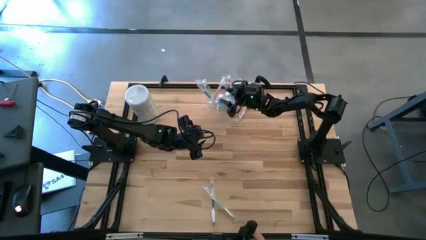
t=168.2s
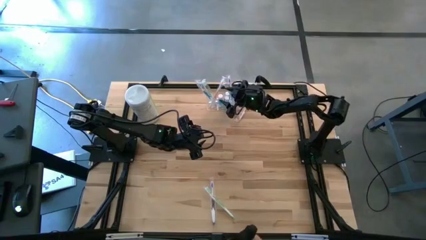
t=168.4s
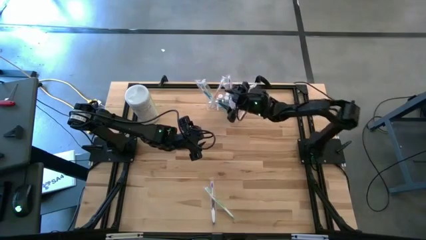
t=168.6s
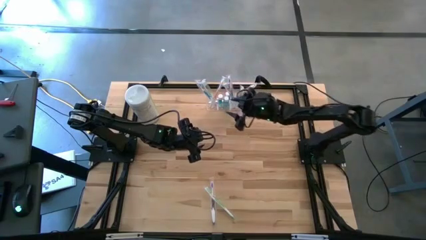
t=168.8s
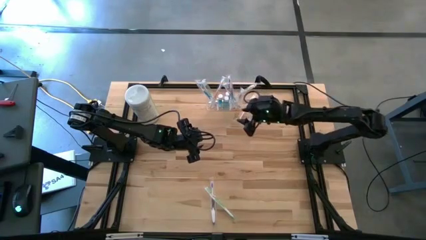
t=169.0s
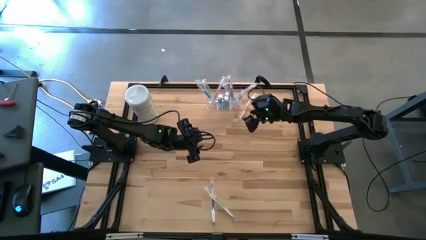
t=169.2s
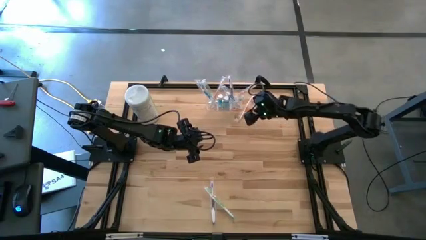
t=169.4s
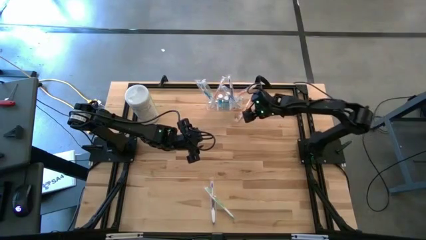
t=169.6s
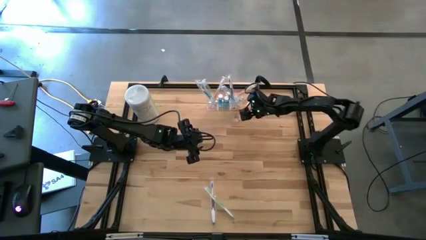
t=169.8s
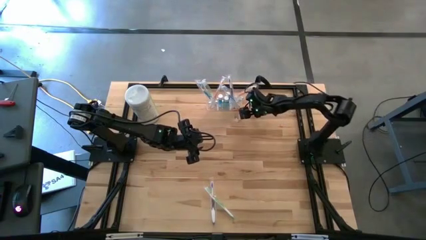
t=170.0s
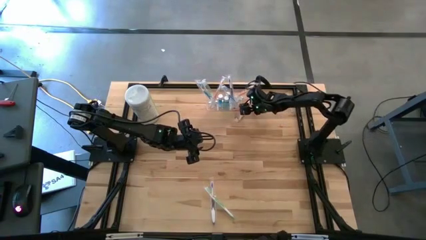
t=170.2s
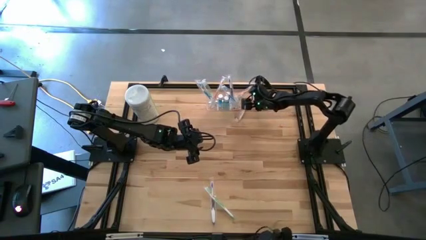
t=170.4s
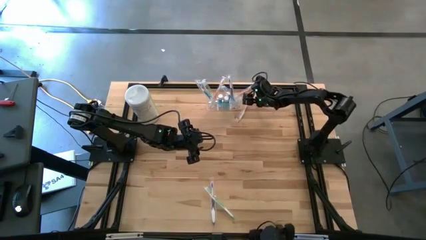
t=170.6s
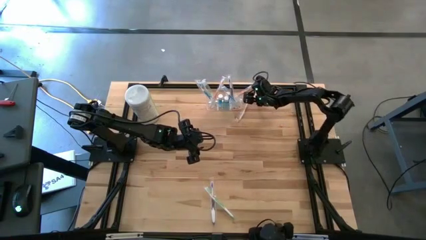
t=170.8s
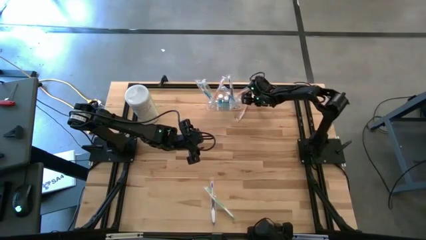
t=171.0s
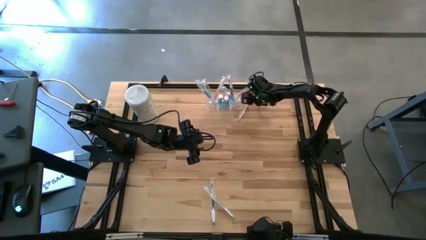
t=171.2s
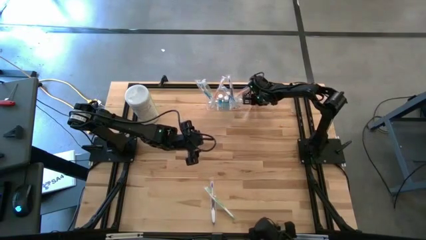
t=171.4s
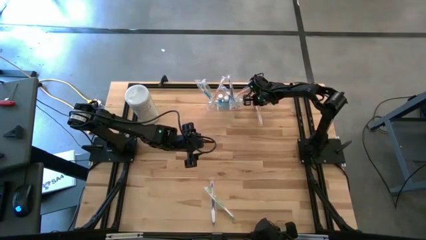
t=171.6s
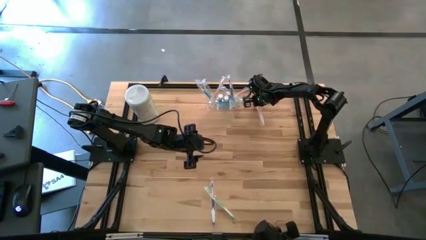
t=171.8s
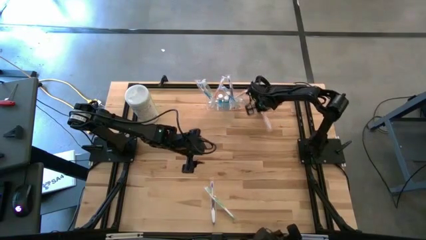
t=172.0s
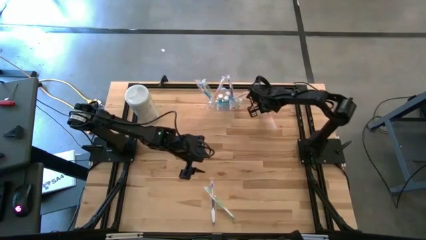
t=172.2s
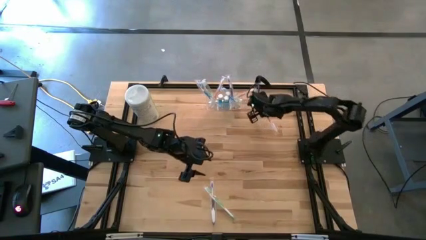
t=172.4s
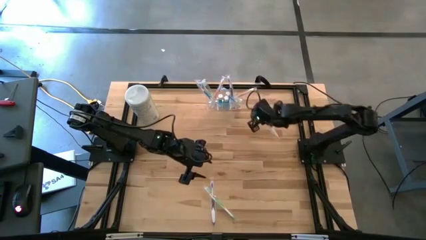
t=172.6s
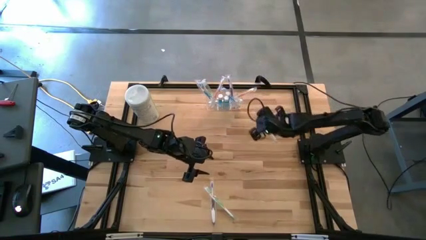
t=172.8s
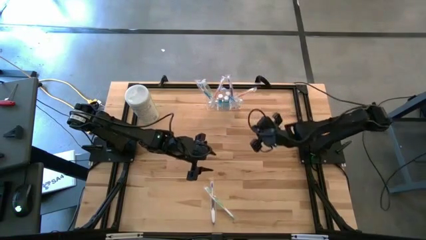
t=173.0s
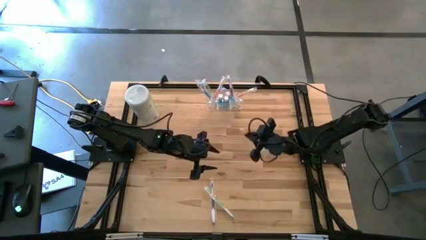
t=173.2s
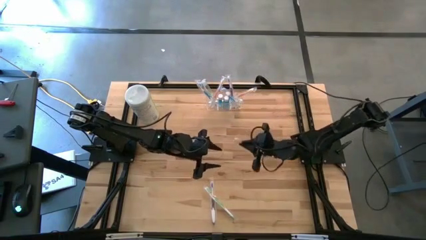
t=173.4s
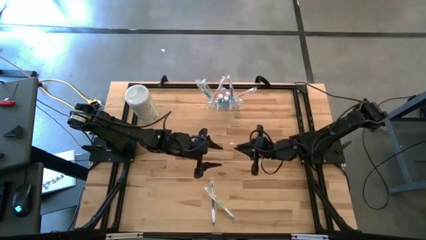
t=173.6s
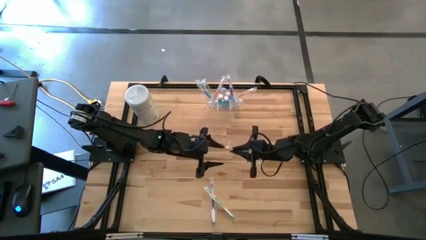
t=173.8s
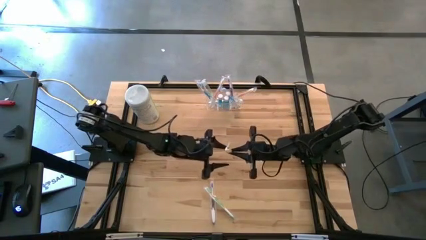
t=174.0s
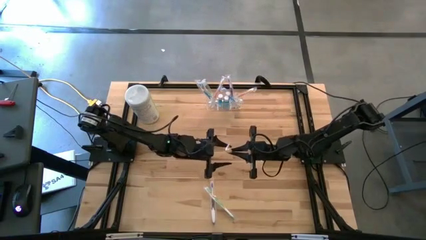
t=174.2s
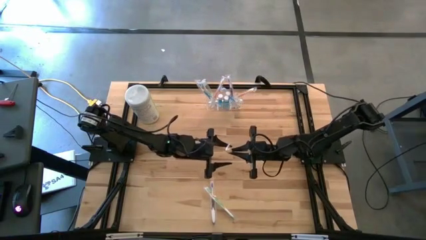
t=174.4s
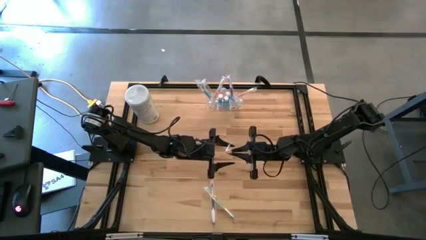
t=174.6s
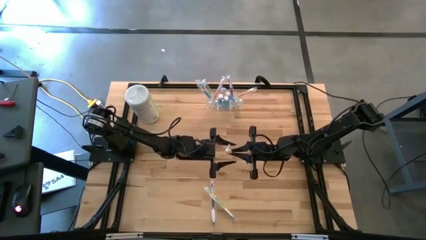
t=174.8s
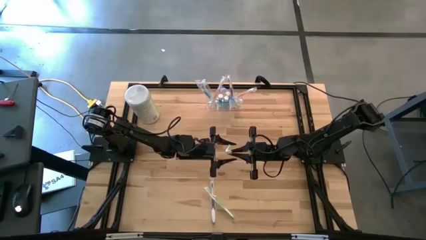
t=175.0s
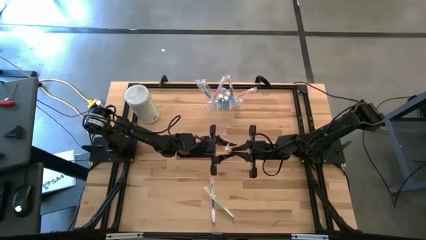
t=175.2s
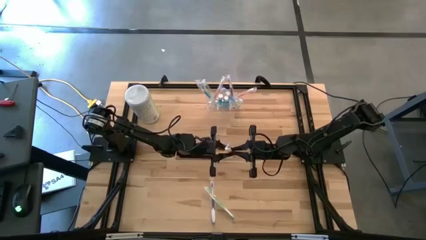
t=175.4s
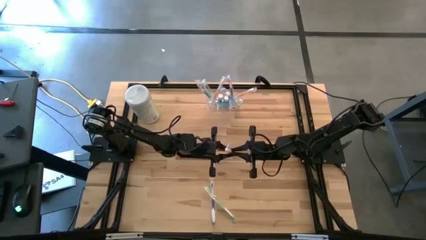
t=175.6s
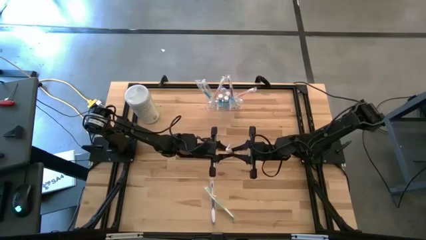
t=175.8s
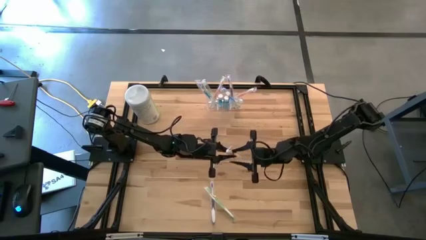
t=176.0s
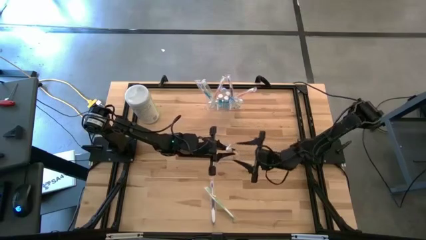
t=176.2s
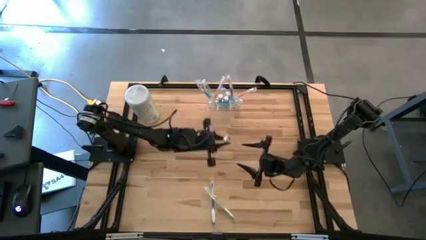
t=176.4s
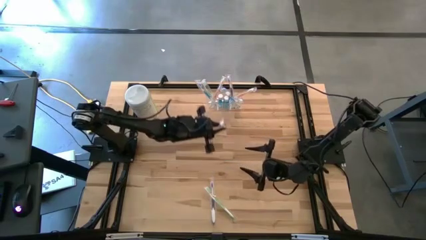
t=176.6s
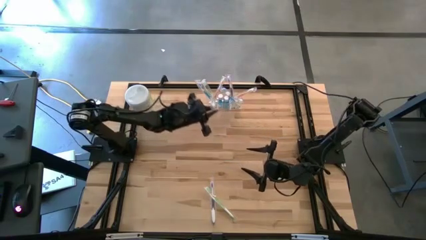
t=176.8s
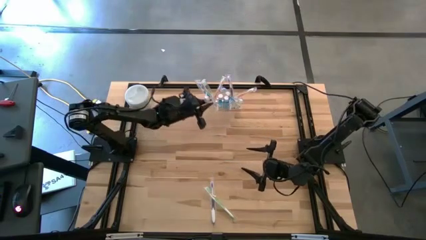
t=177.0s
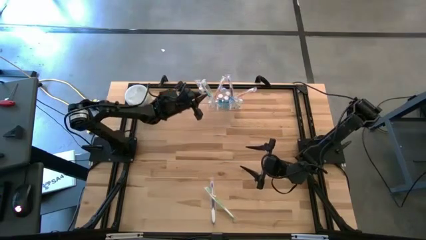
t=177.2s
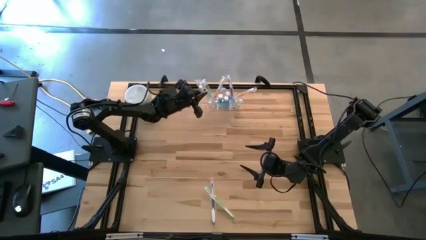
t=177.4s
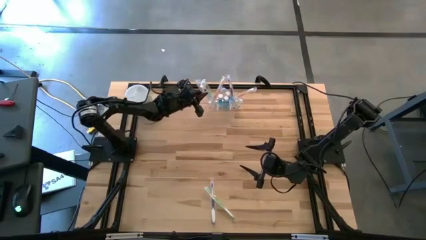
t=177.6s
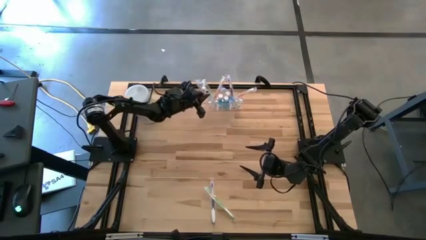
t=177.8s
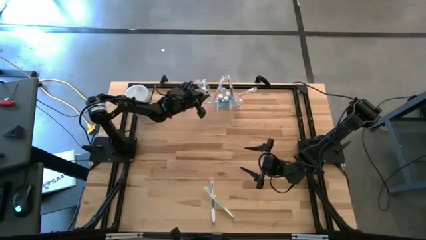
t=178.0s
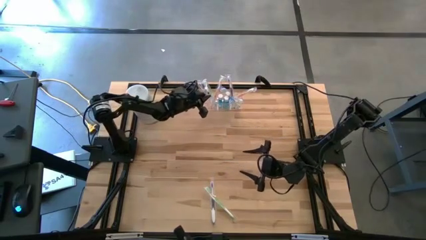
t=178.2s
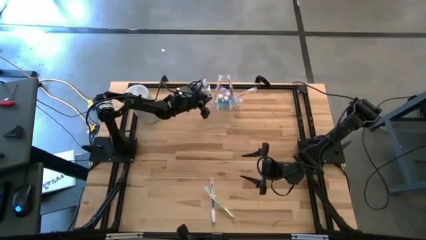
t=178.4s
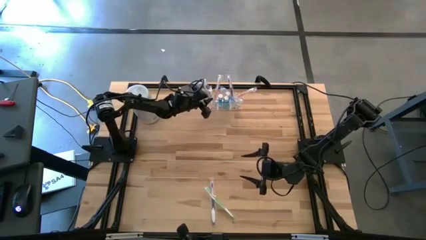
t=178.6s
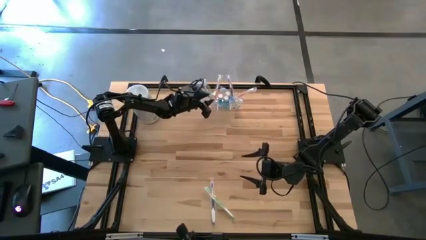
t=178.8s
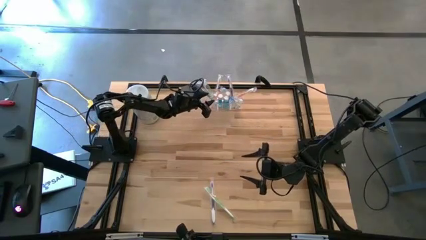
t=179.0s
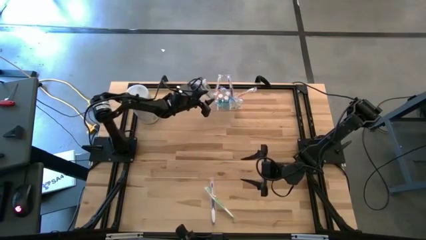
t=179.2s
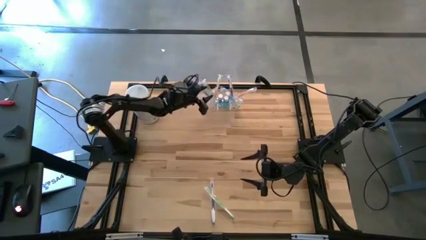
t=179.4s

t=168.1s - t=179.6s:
Task: Pick & Place toothbrushing station
Put the orange toothbrush into the transparent organizer

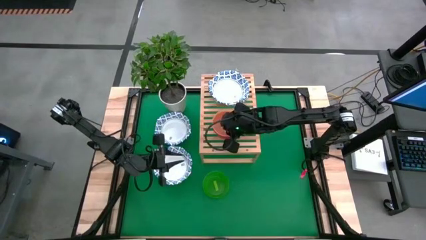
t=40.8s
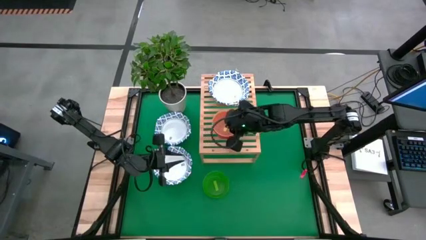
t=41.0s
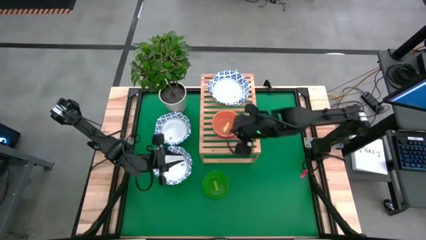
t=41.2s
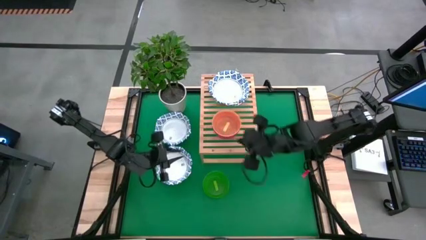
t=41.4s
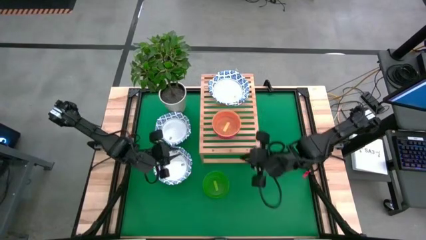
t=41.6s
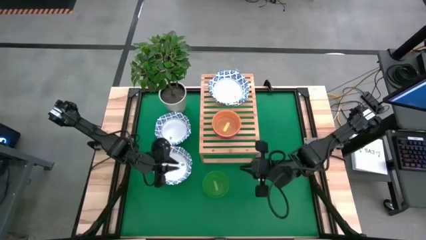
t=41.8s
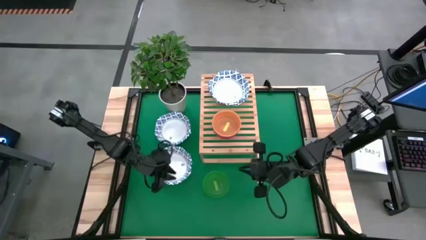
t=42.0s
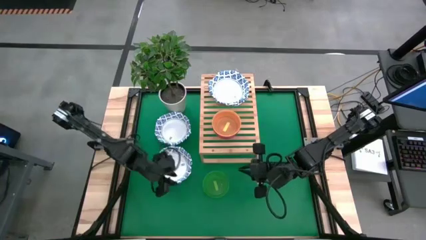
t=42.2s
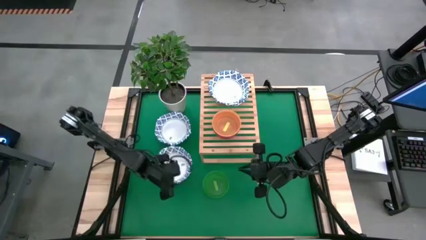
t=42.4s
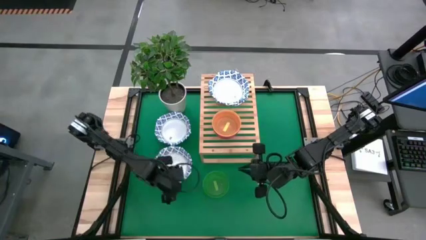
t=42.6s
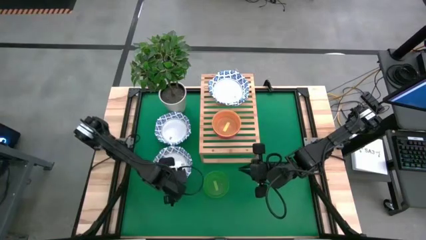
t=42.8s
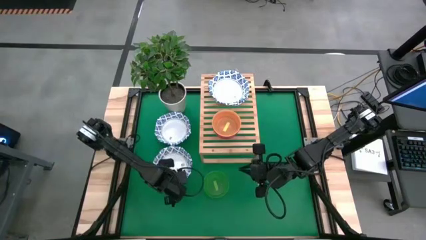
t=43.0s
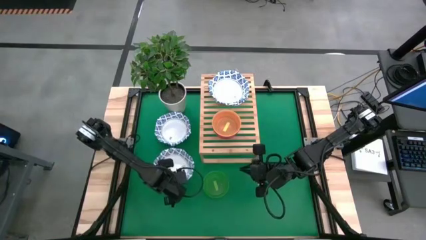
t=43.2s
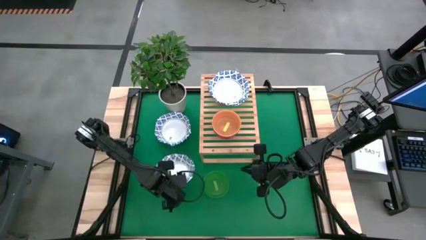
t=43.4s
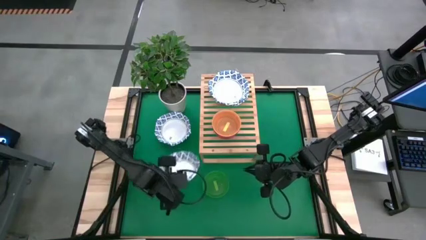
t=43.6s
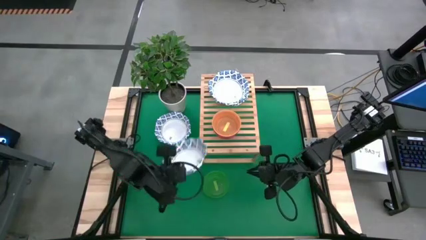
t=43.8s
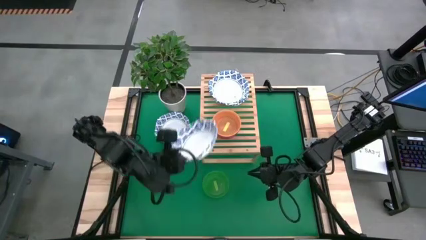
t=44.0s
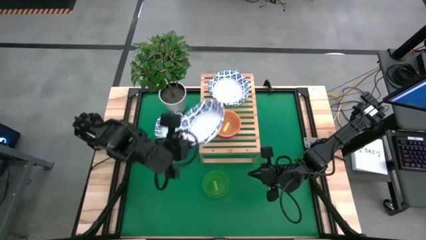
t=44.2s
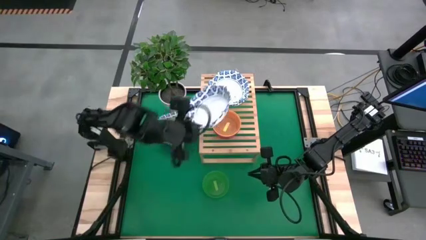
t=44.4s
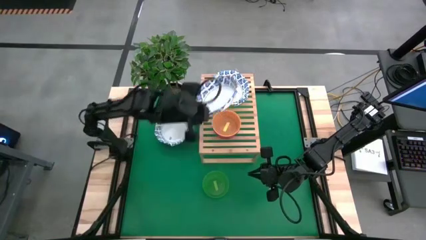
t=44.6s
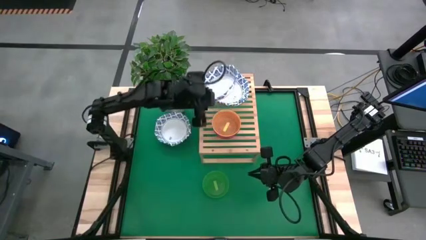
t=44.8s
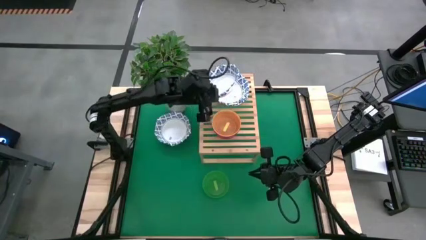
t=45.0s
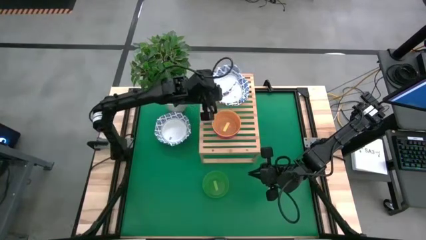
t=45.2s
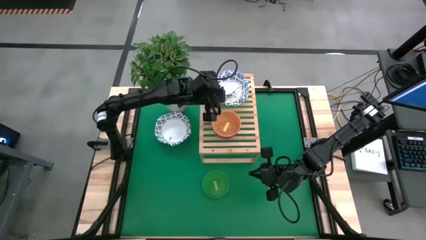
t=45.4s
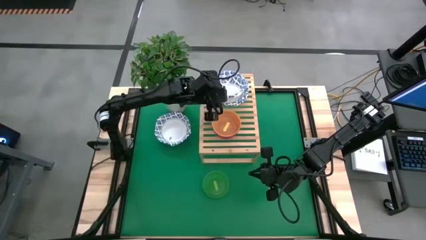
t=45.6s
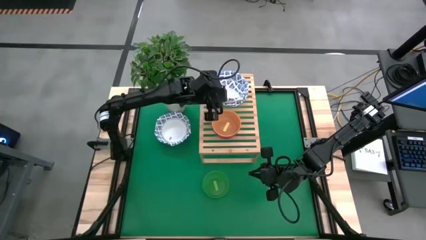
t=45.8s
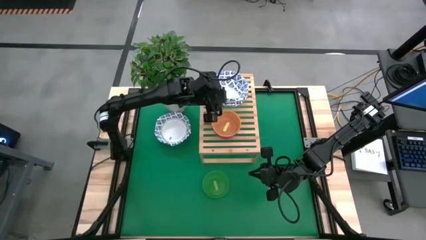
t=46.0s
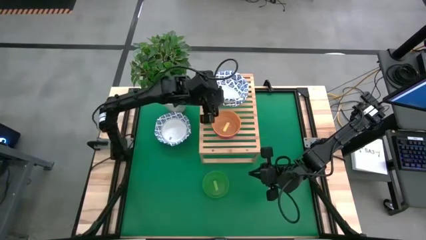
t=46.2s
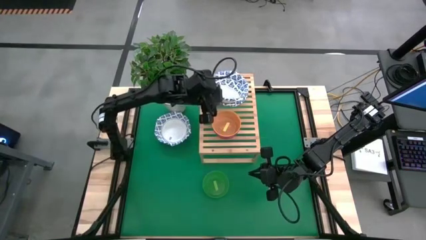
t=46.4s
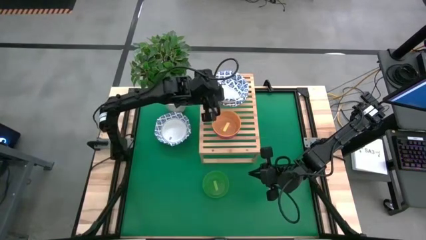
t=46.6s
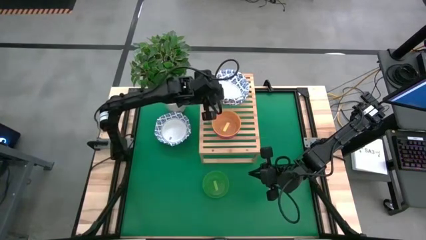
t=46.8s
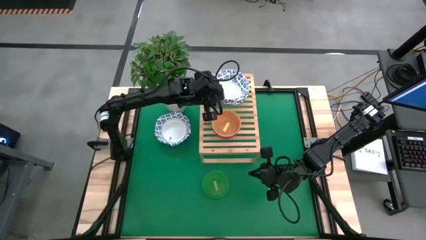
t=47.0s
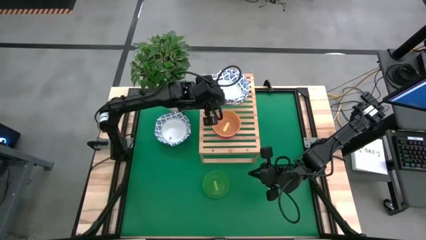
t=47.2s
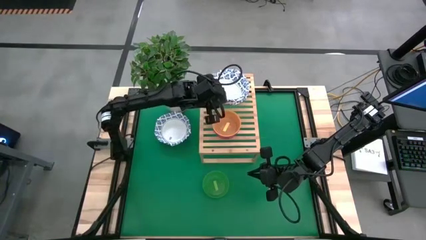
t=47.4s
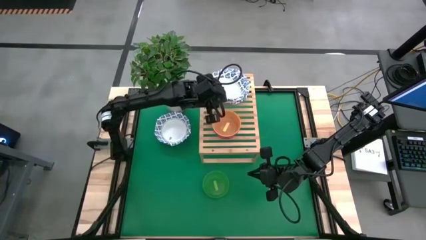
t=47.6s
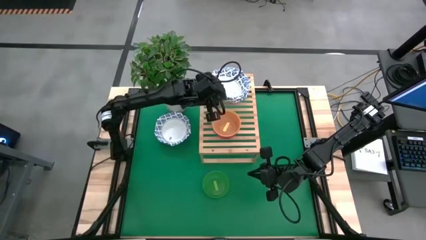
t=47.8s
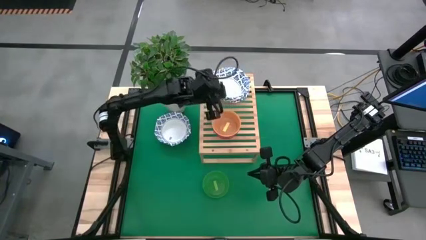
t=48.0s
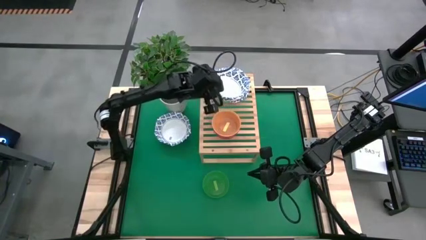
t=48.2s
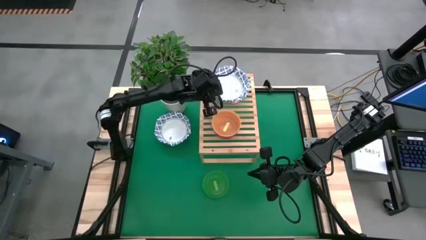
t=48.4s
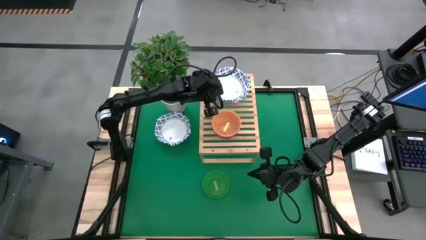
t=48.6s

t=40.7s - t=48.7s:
Task: Place and stack bowls onto a shelf
Stack the white patterned bowl on top of the other white patterned bowl on the shelf
